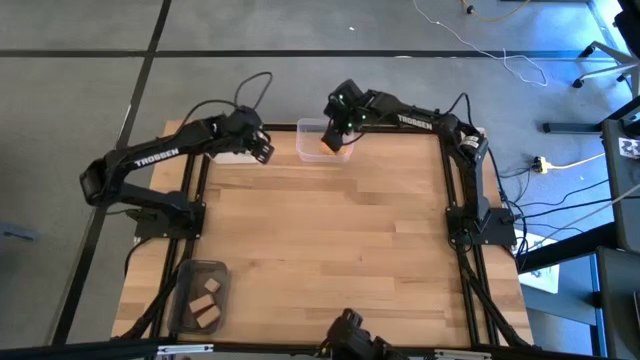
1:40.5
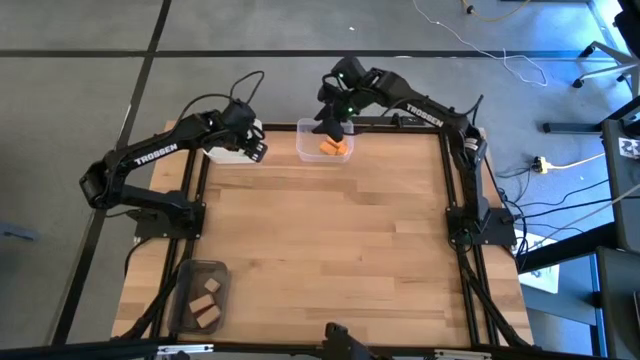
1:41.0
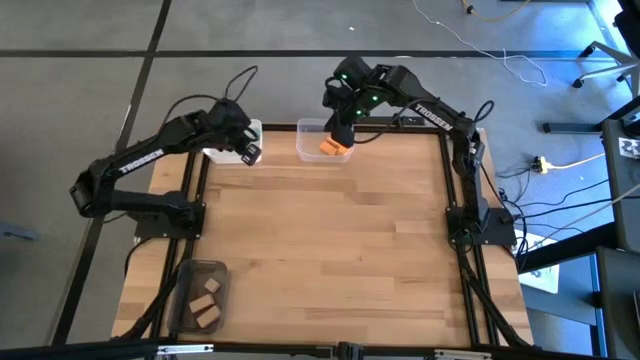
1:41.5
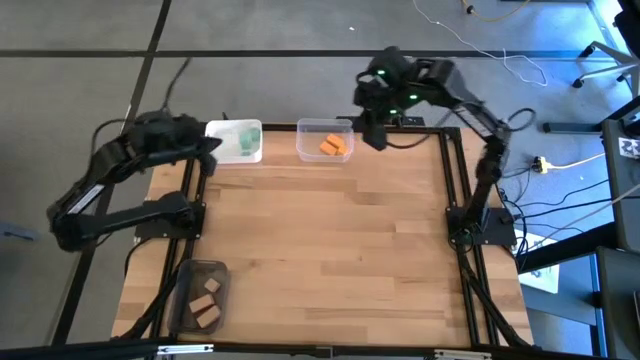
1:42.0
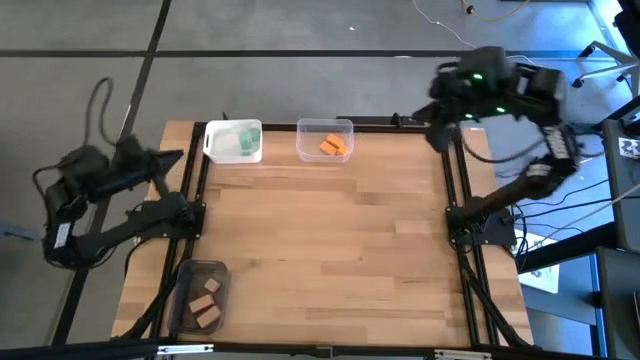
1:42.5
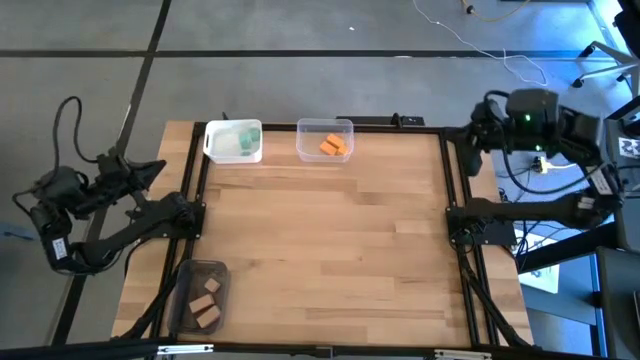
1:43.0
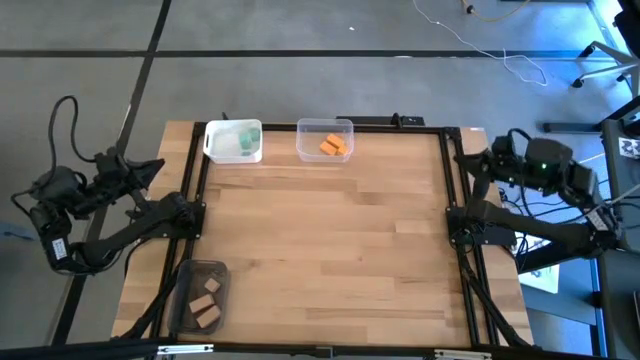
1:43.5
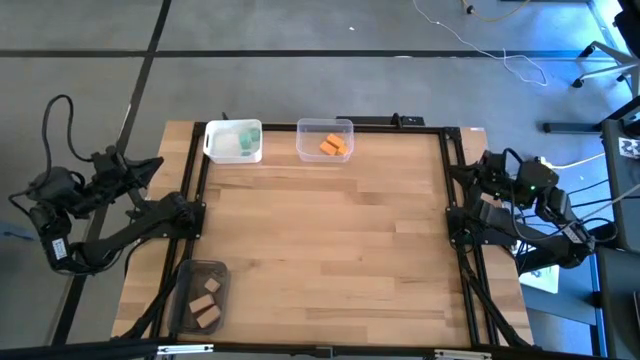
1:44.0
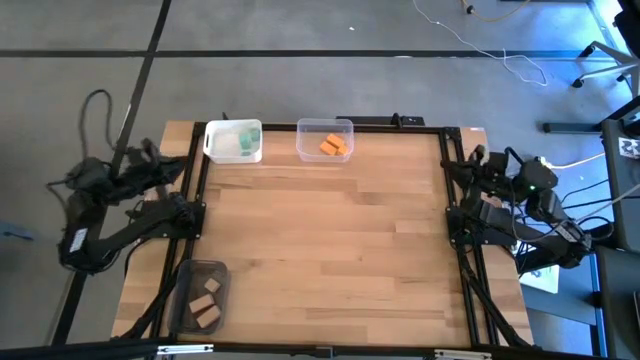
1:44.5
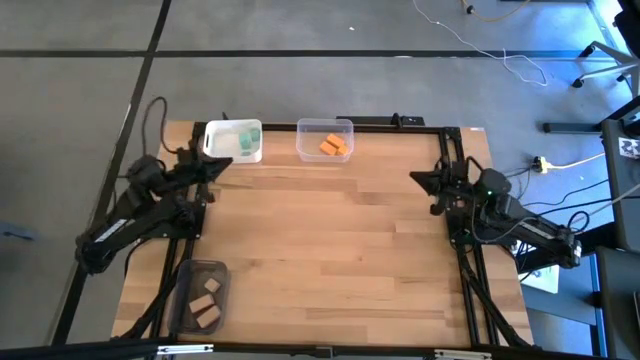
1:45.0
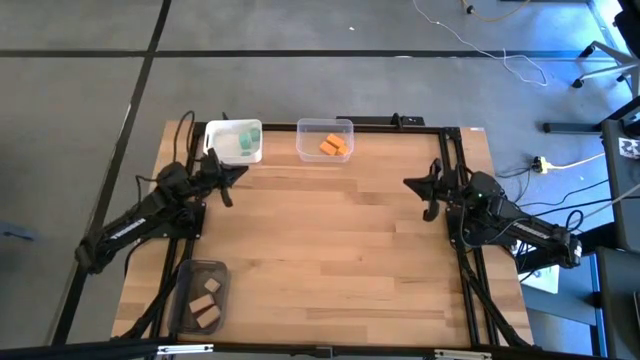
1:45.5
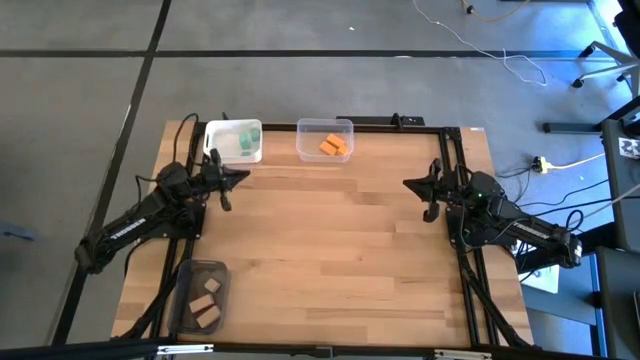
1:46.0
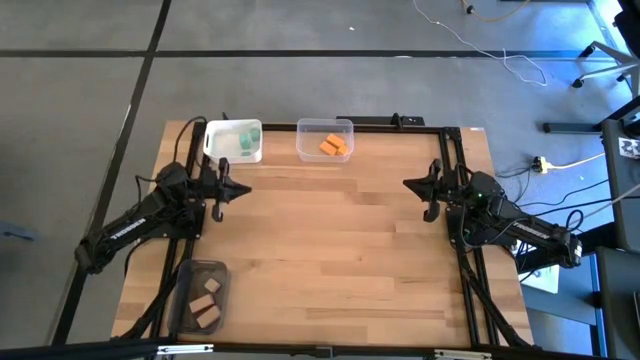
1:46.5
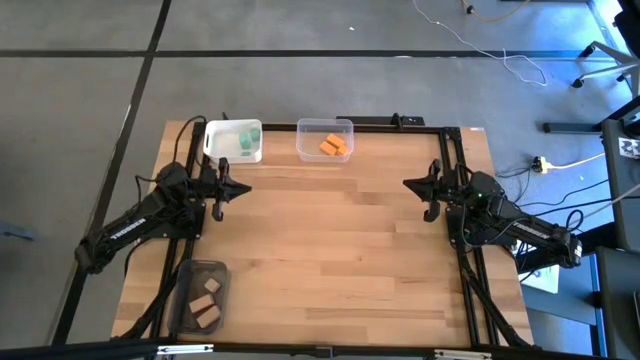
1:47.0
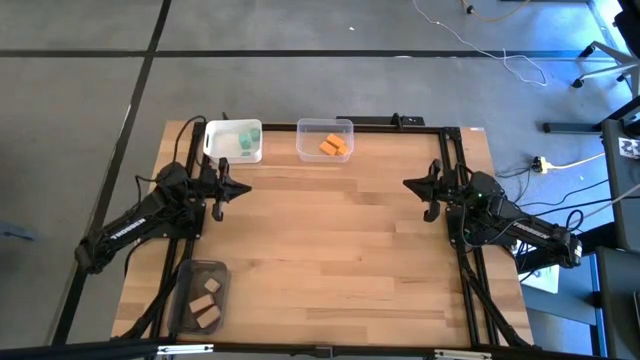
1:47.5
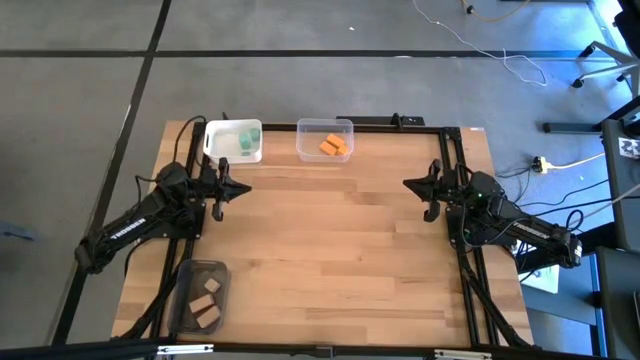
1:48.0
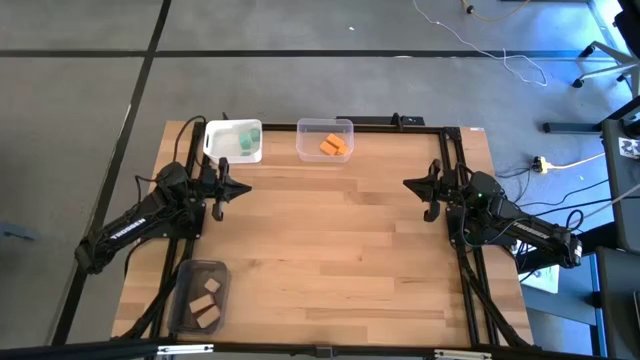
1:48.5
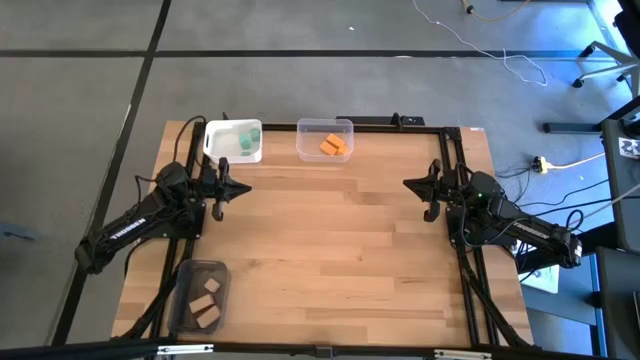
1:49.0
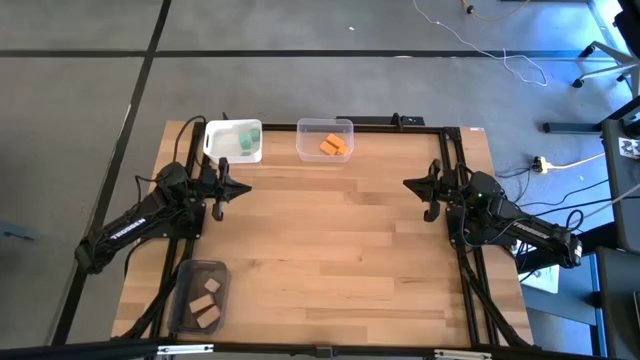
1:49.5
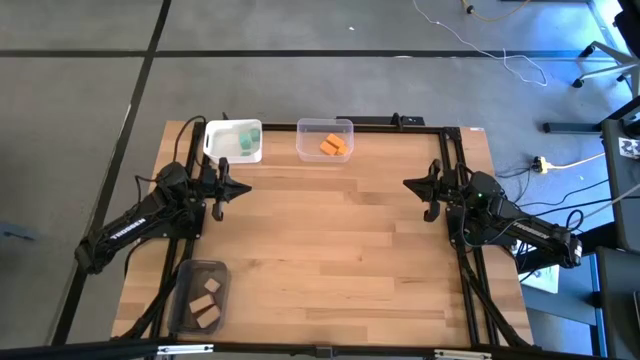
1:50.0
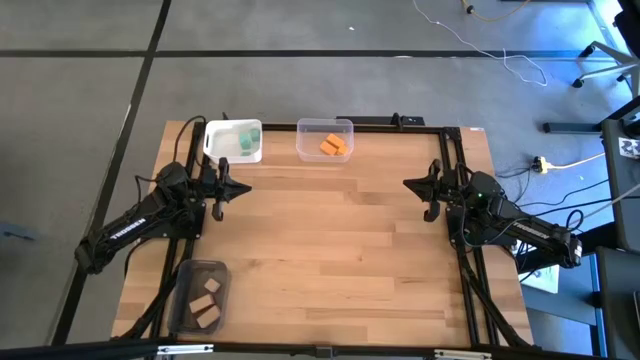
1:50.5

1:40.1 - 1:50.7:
Task: Sort & place blocks by color
Return to Home Position

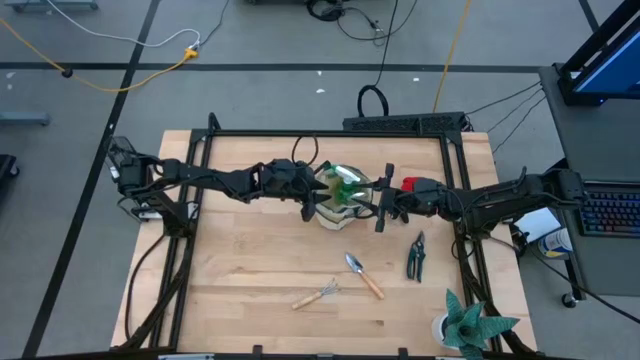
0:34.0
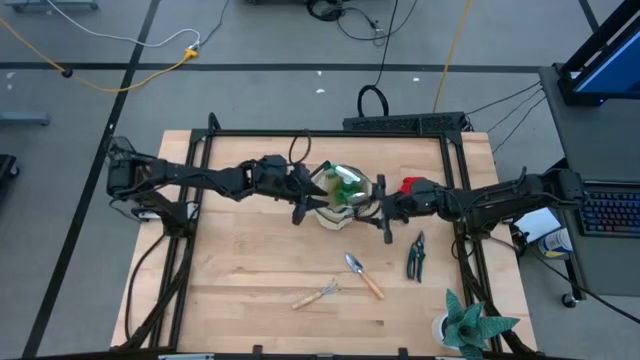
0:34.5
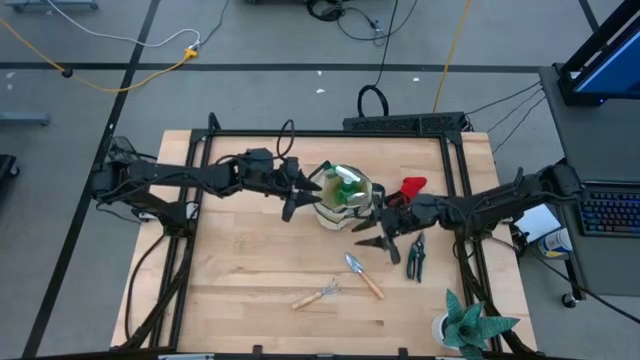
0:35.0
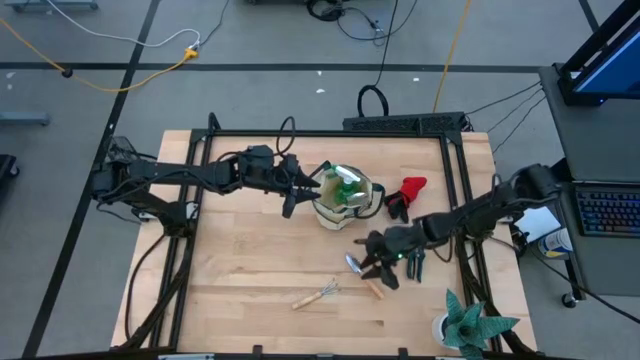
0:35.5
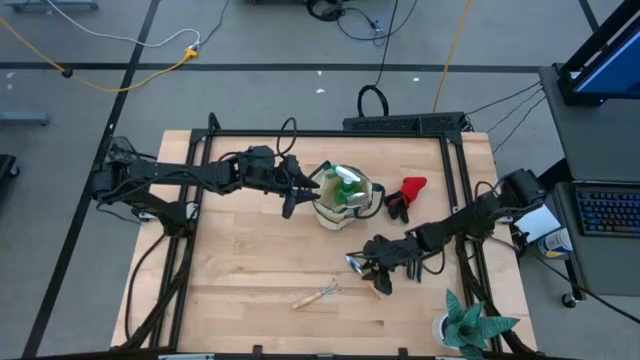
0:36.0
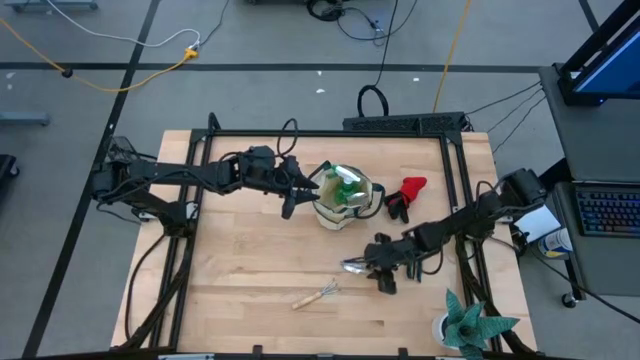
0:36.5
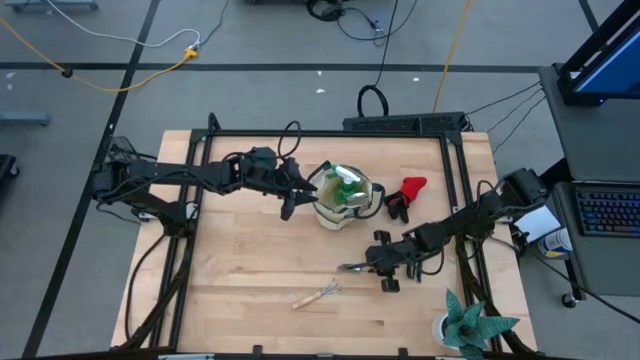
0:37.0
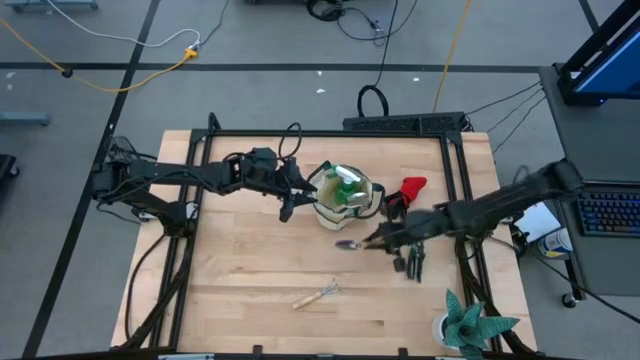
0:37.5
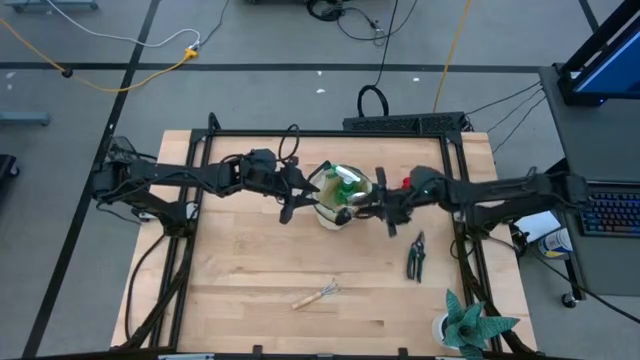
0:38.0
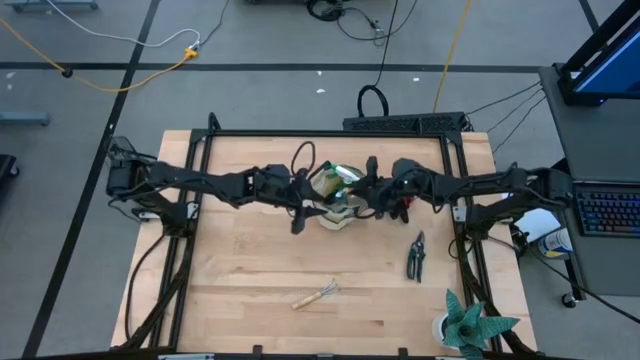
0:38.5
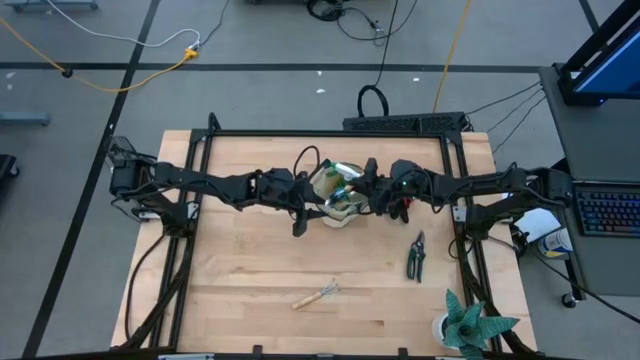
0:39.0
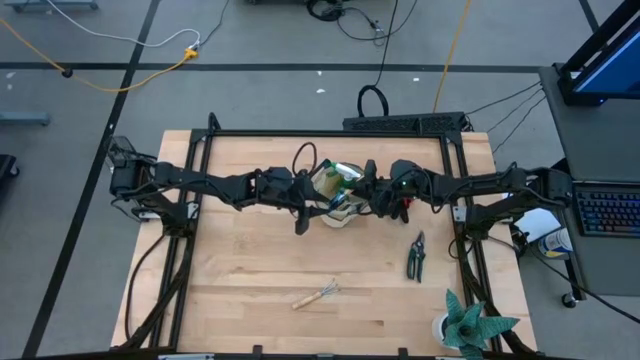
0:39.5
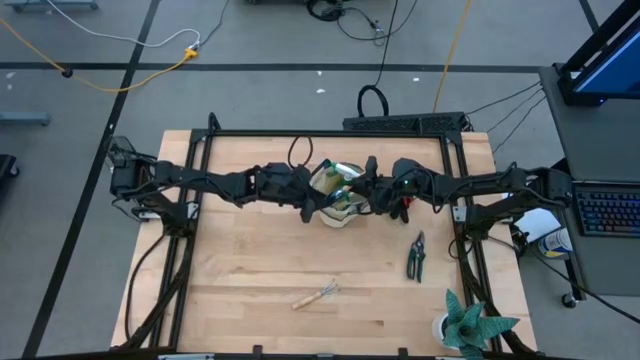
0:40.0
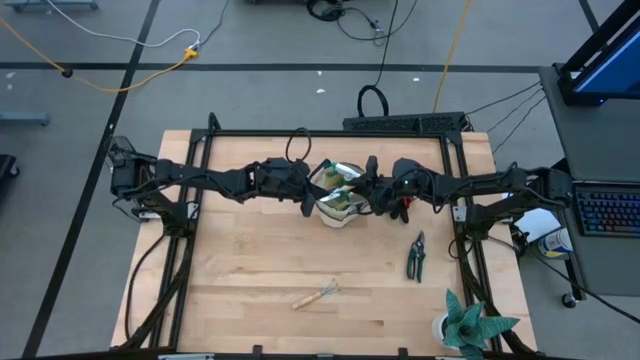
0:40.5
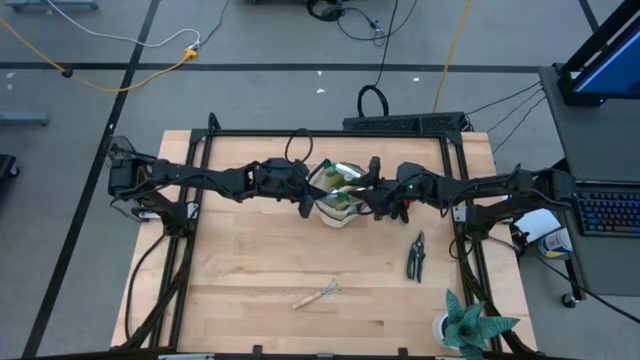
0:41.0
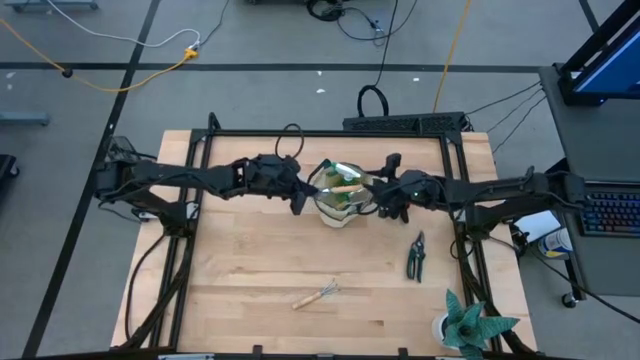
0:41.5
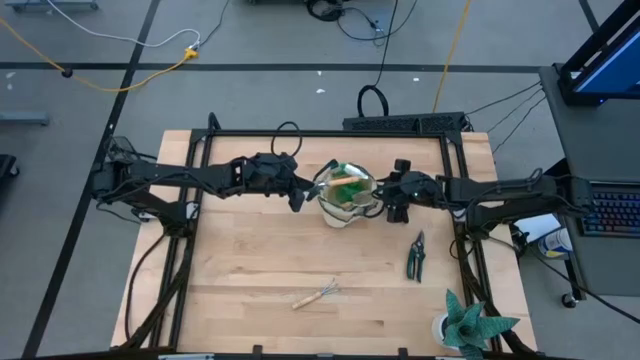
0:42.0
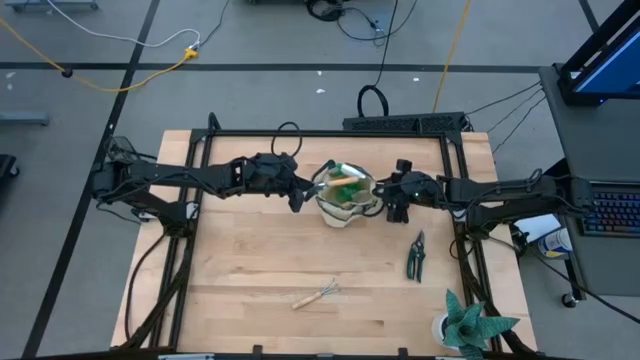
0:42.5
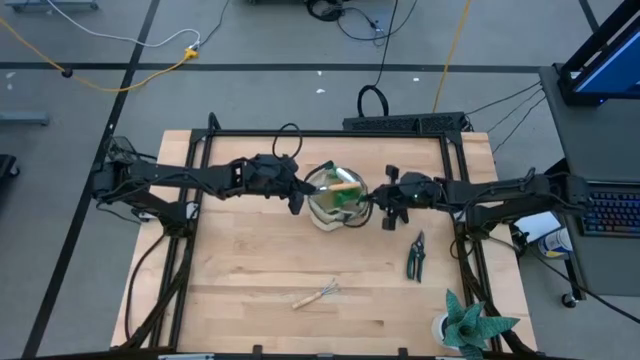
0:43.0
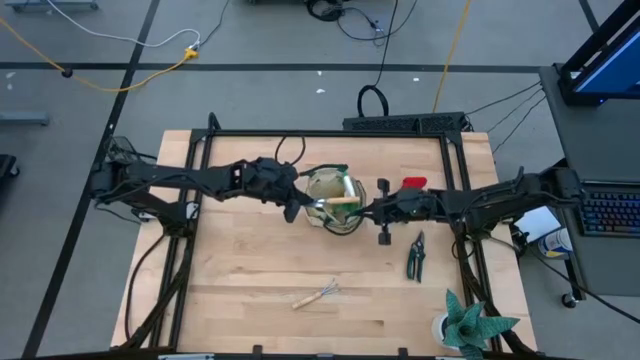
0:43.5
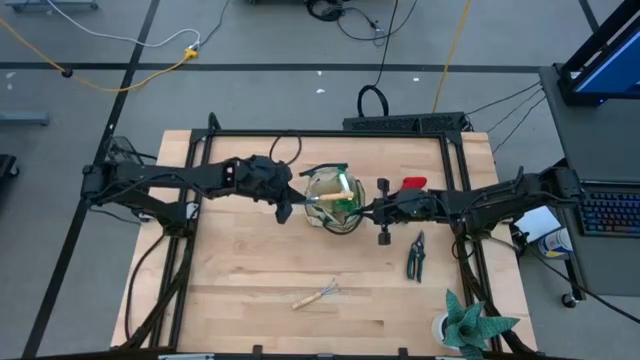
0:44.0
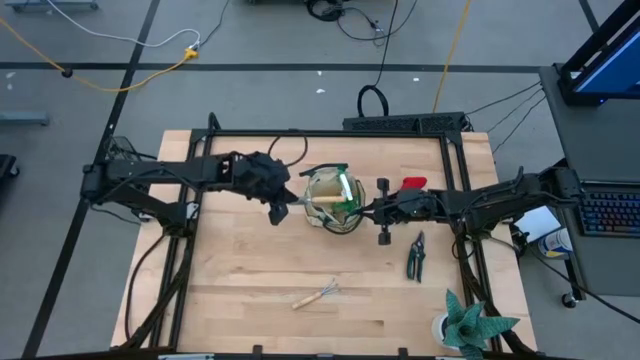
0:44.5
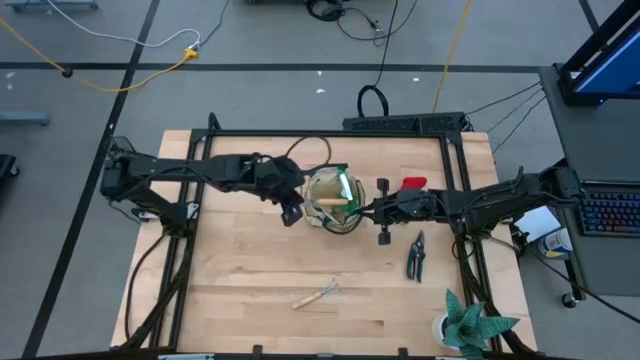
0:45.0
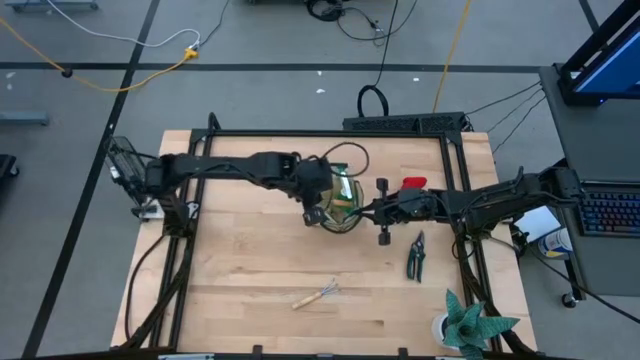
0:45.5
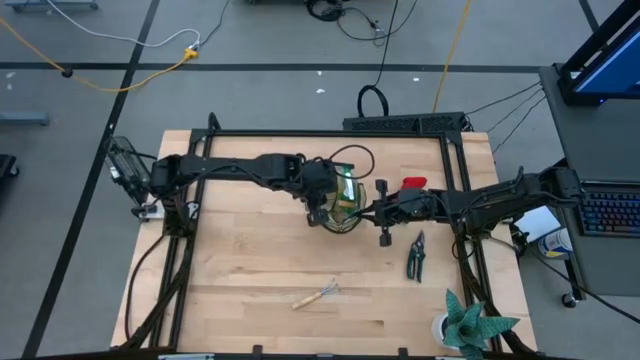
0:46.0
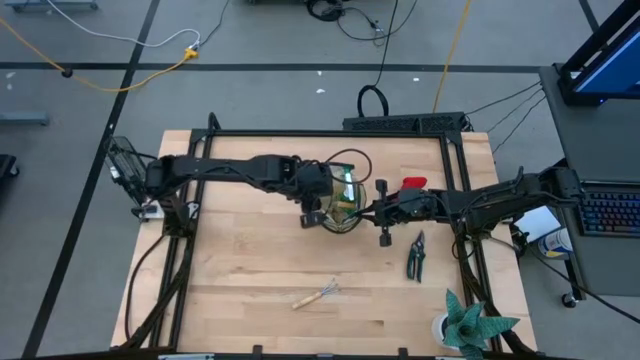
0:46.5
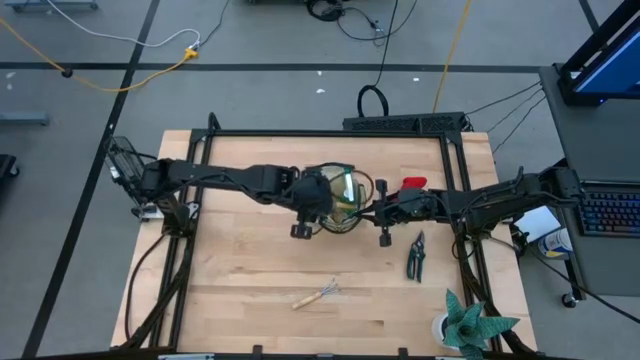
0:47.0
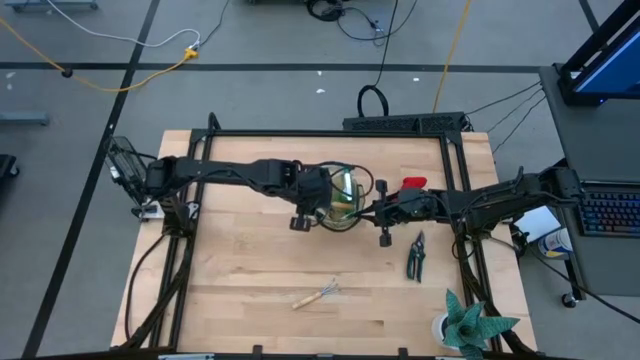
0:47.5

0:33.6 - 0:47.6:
Task: Pick & Place Garden tools in Gardening bag
Put the brown trowel into the brown gardening bag
